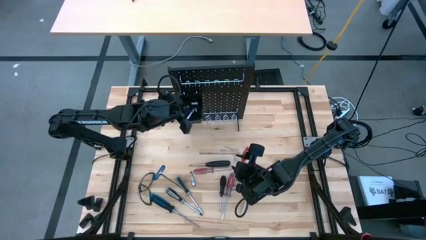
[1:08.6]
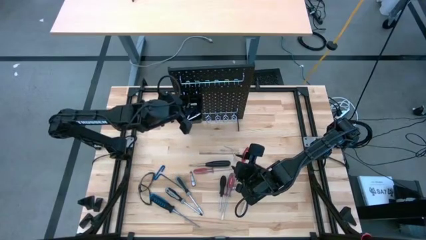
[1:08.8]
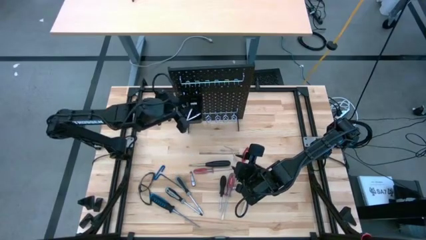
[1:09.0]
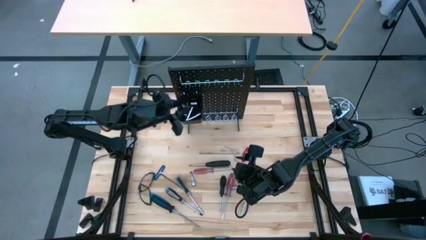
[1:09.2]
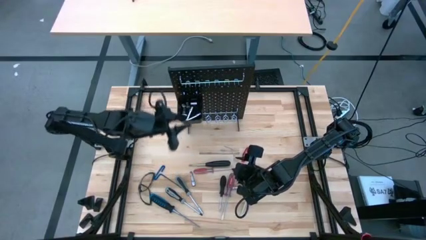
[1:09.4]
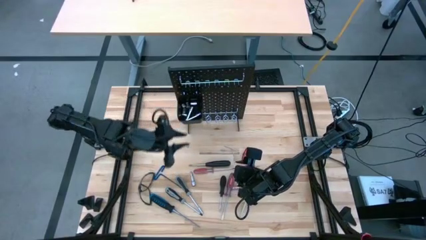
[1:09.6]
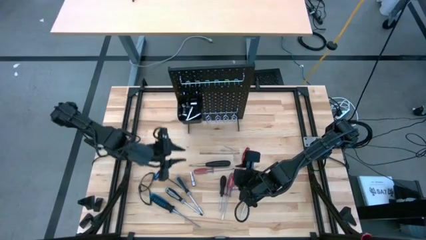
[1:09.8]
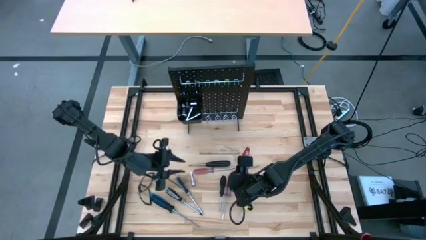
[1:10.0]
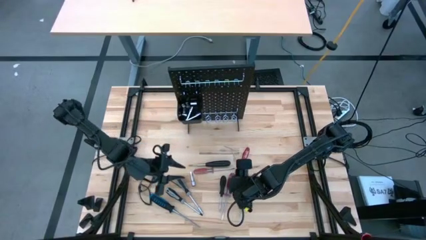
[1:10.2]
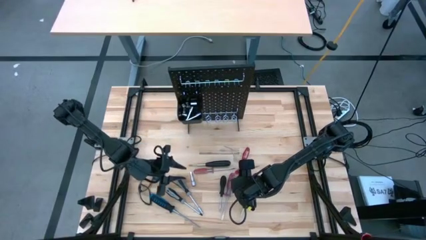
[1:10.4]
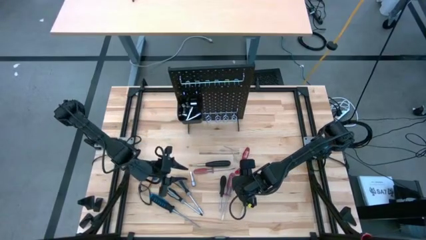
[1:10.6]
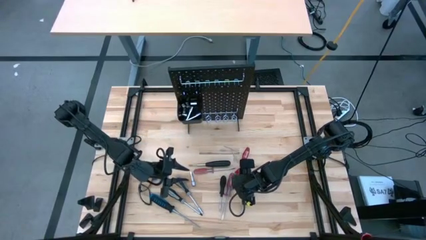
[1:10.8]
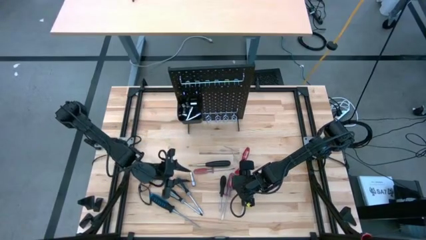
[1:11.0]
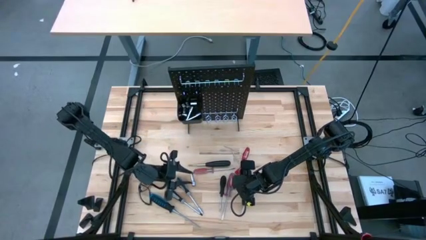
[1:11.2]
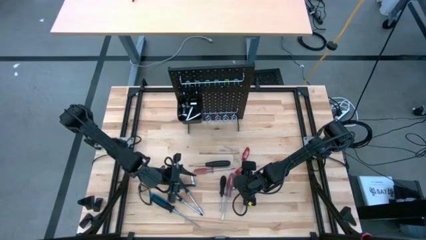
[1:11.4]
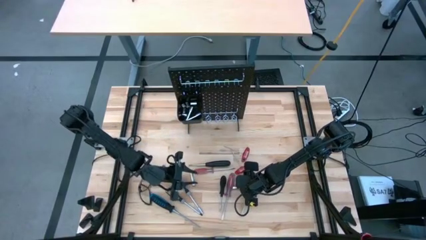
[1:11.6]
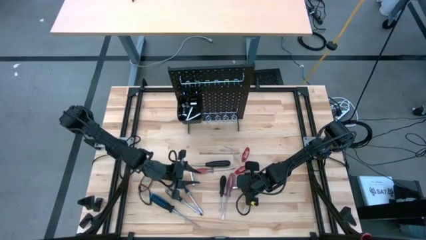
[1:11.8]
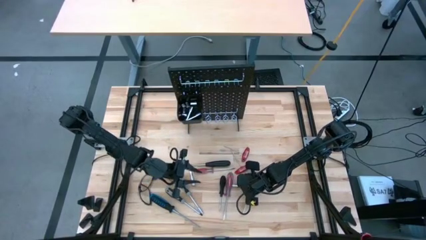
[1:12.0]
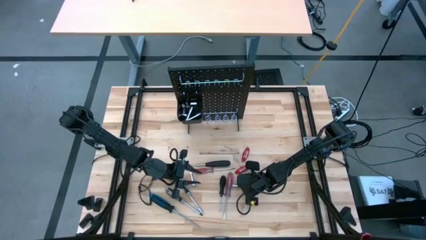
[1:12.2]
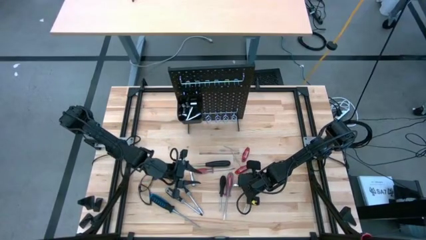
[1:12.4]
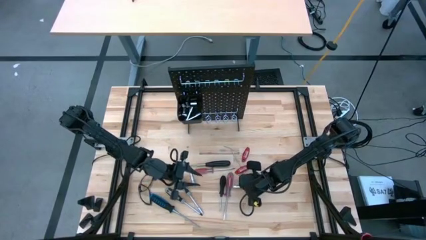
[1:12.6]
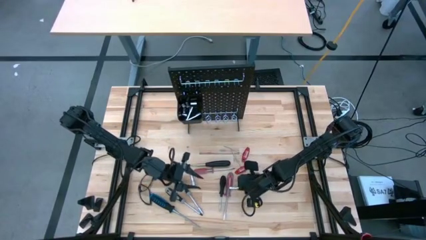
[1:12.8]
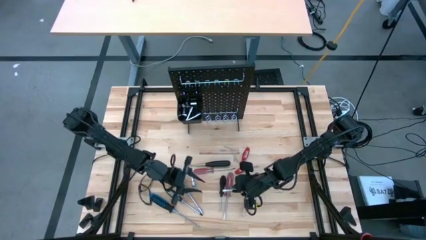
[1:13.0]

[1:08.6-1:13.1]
Task: Hang tools onto peg board
Put the extension bar into the black bin on the pegboard

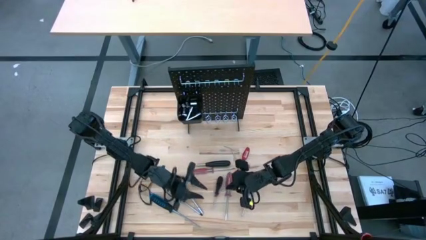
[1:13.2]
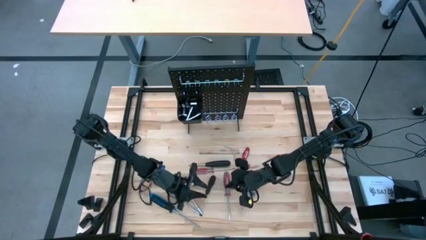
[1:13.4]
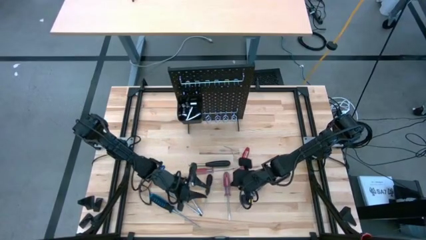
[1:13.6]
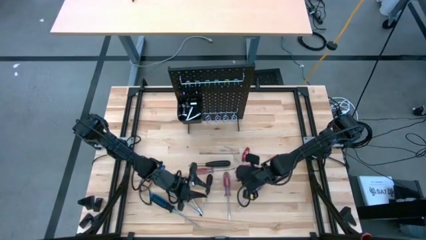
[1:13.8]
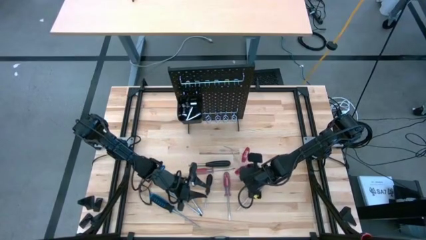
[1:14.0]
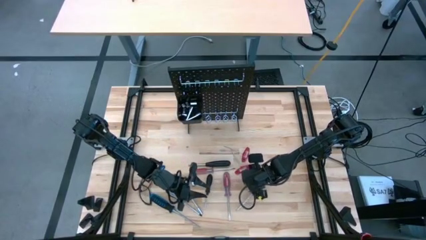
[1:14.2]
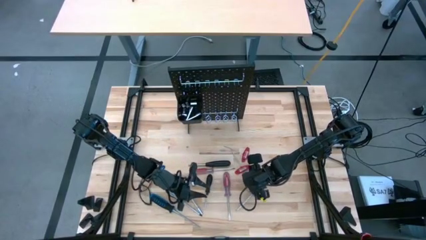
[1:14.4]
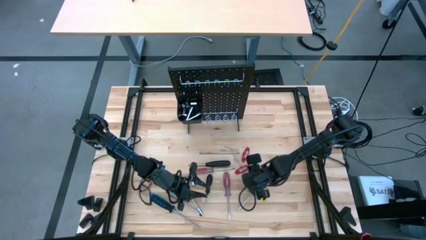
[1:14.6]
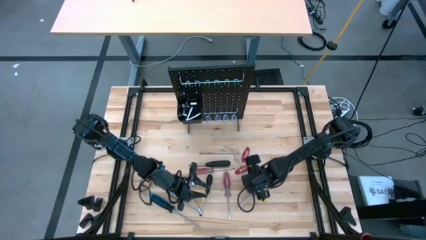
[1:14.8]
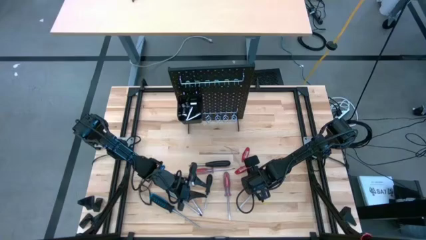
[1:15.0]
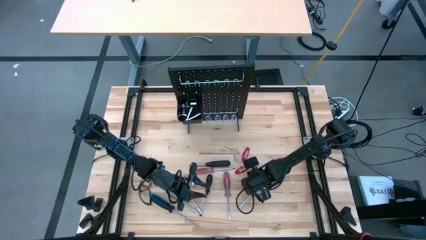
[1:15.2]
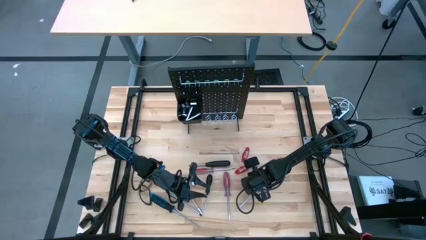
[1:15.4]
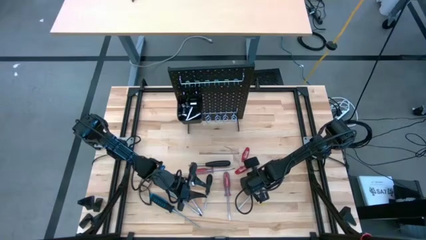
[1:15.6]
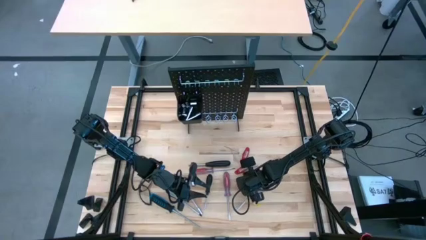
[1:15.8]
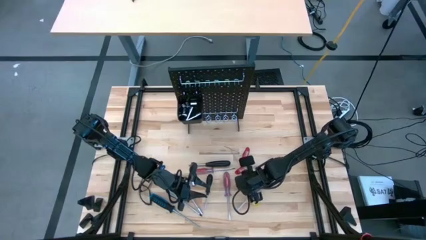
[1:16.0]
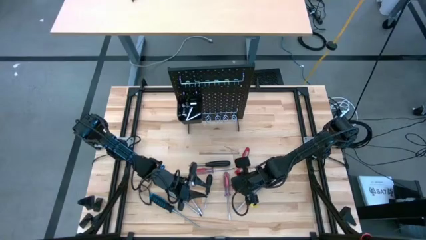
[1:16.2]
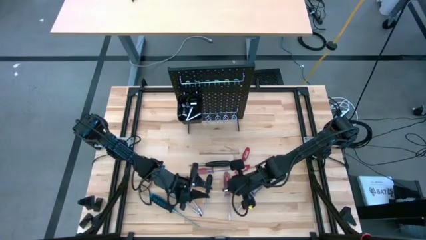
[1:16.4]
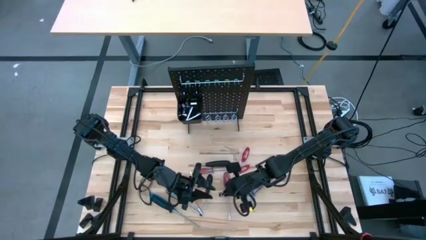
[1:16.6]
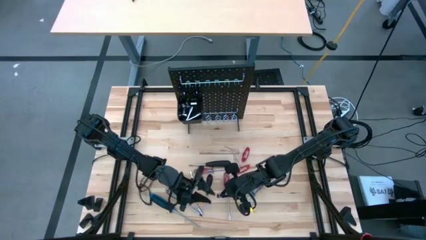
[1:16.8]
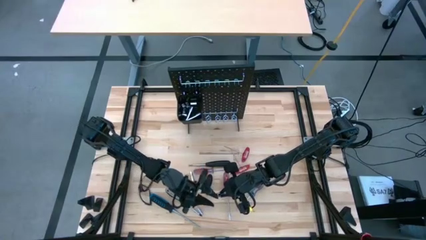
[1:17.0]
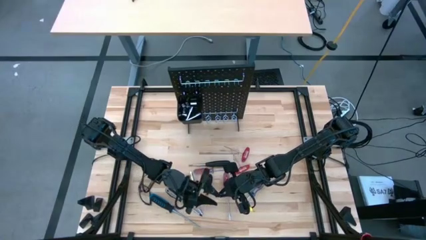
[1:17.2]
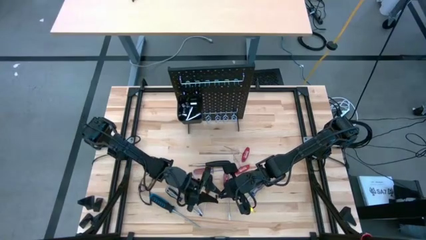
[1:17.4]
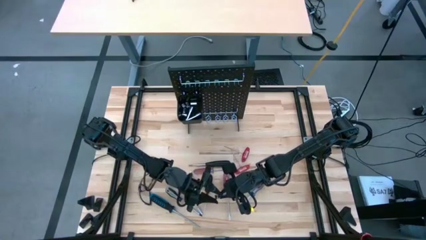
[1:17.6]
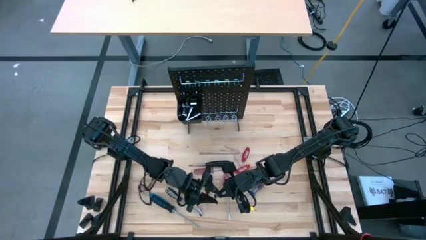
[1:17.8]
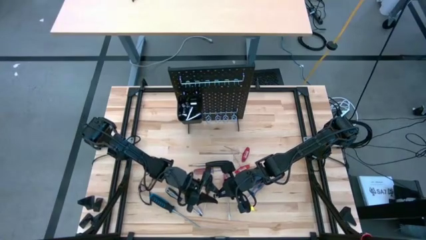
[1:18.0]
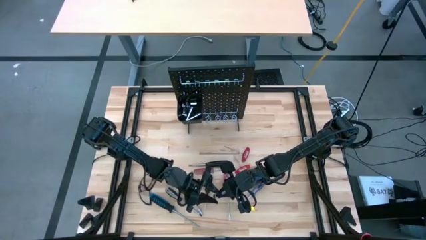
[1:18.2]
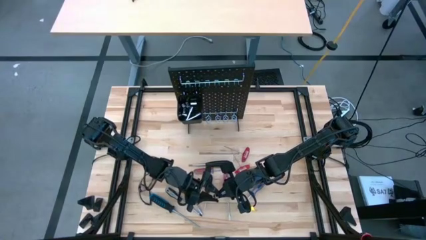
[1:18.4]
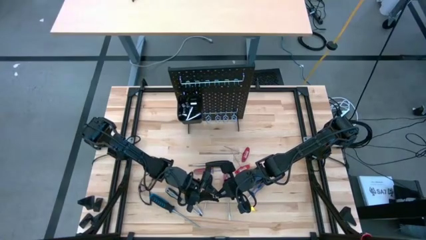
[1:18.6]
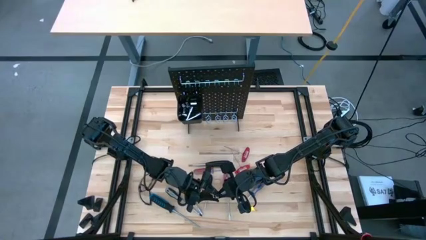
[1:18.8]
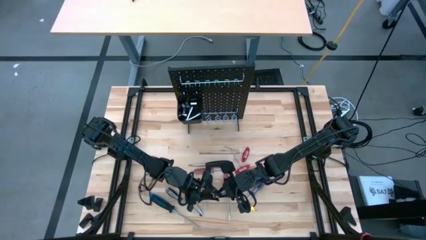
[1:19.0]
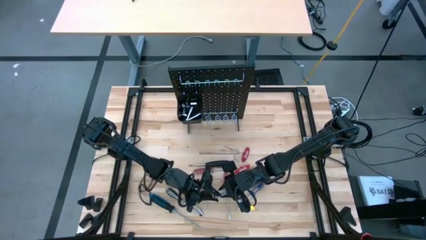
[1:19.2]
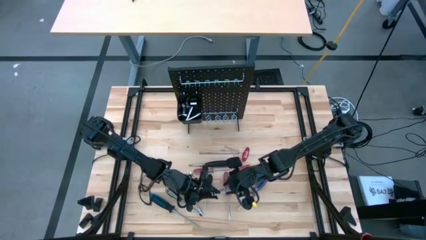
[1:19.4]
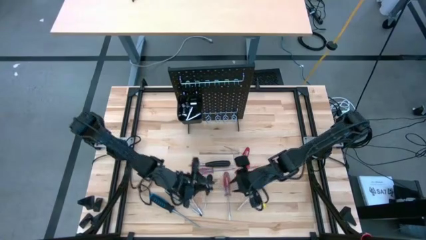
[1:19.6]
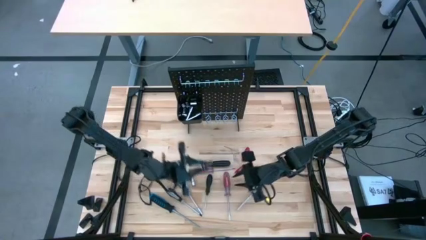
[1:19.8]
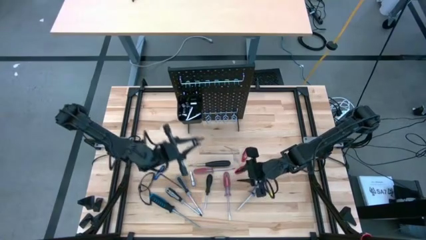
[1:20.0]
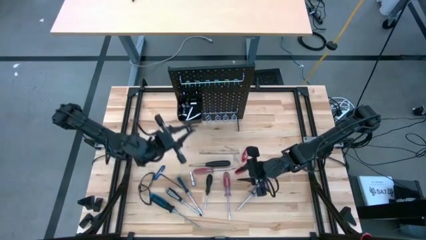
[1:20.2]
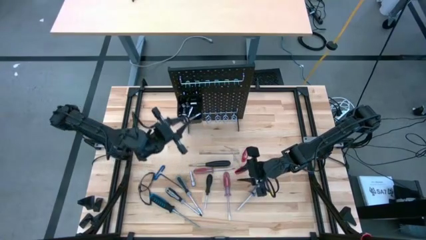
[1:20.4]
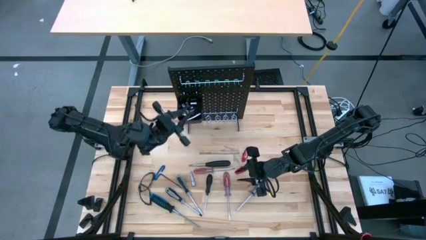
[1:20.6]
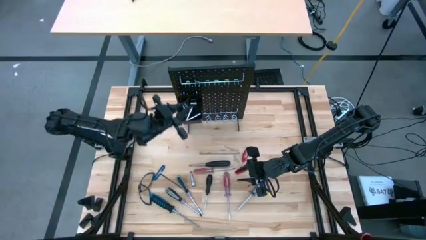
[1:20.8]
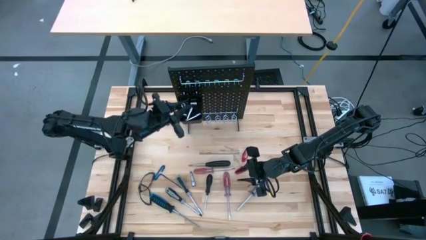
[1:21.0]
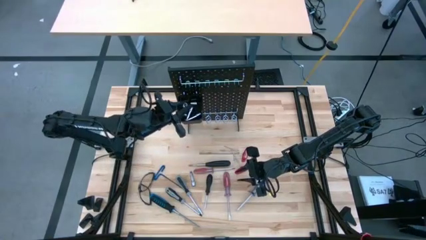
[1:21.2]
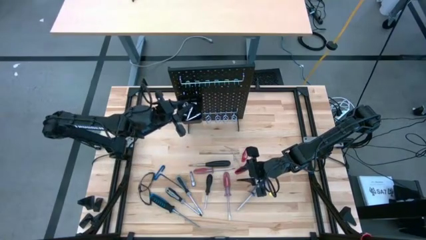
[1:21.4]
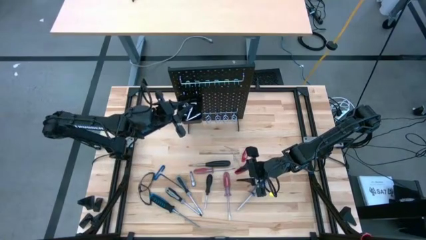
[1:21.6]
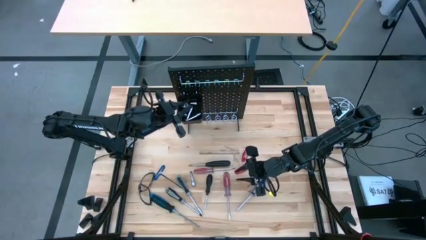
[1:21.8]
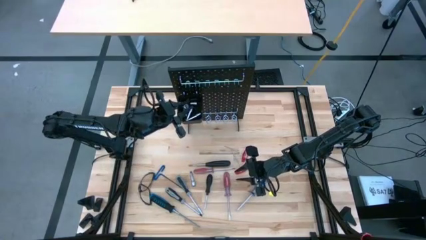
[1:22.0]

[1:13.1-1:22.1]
Put the extension bar into the black bin on the pegboard

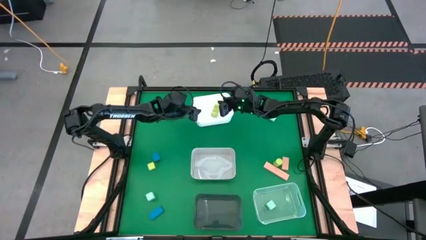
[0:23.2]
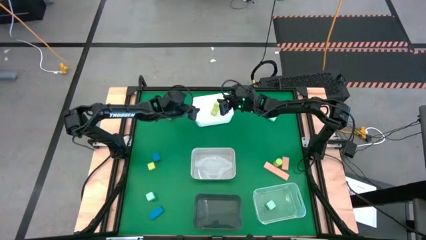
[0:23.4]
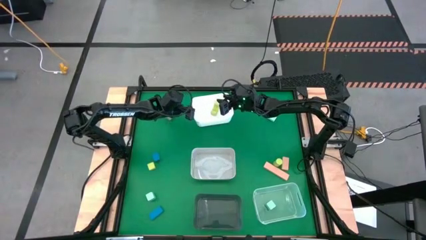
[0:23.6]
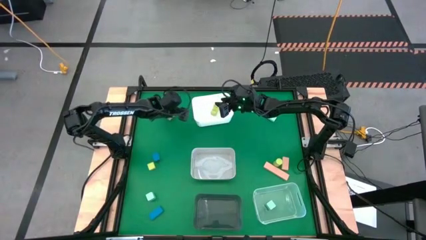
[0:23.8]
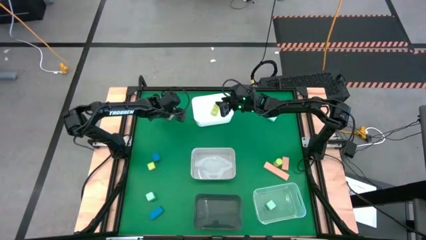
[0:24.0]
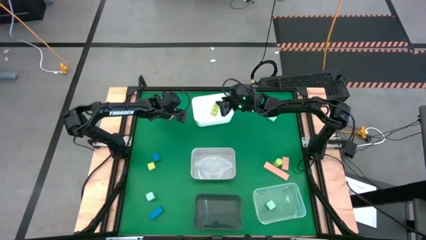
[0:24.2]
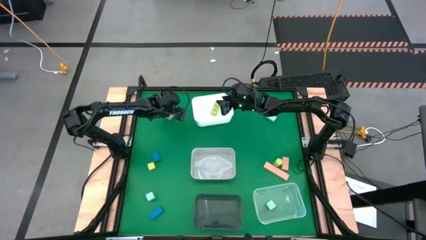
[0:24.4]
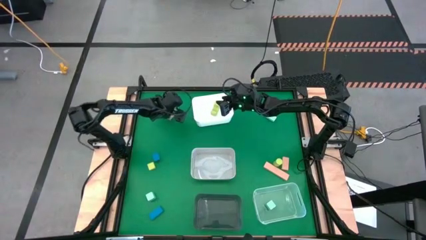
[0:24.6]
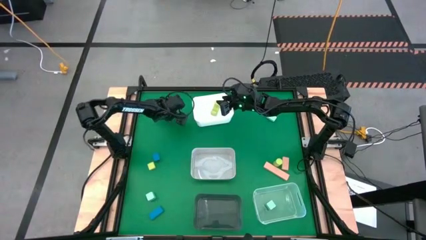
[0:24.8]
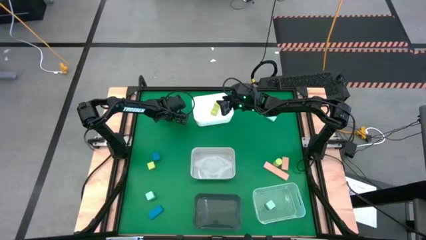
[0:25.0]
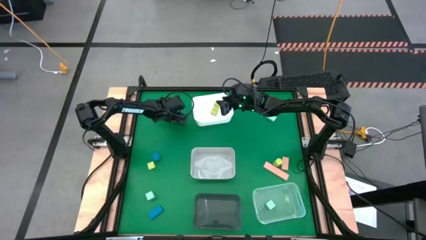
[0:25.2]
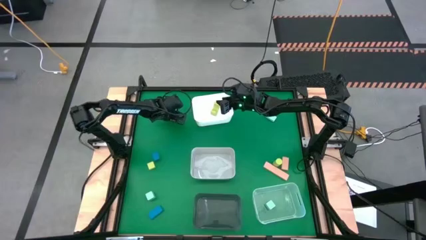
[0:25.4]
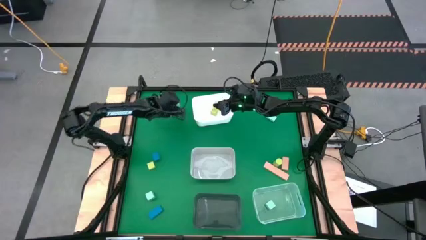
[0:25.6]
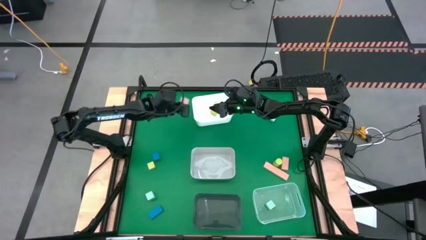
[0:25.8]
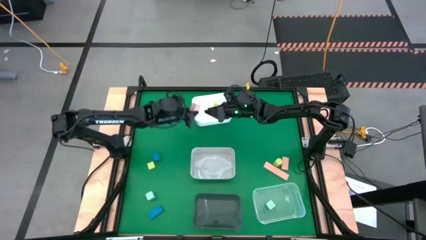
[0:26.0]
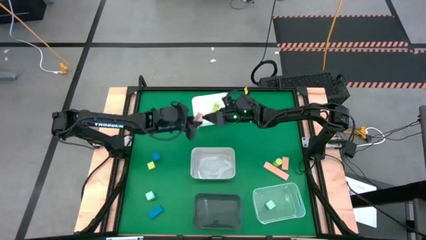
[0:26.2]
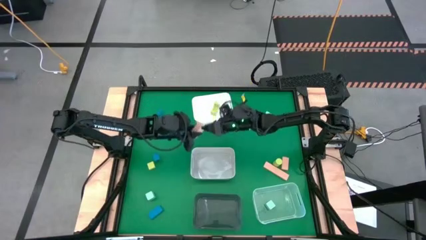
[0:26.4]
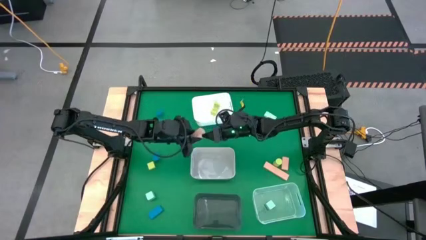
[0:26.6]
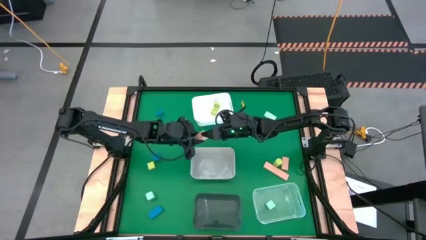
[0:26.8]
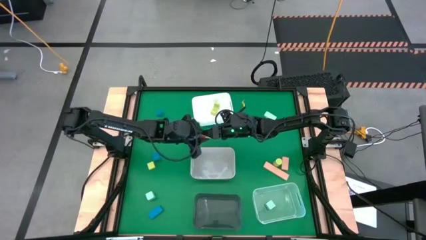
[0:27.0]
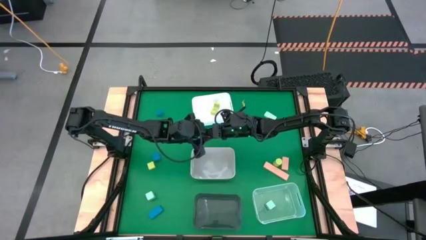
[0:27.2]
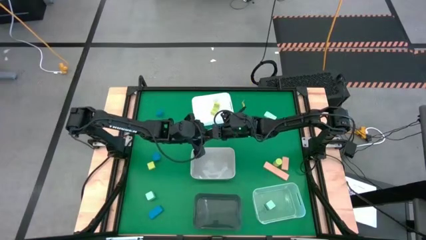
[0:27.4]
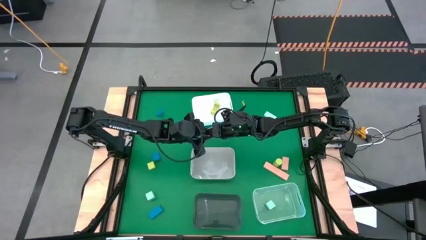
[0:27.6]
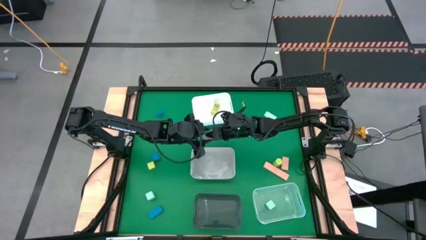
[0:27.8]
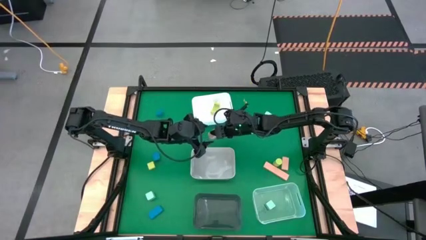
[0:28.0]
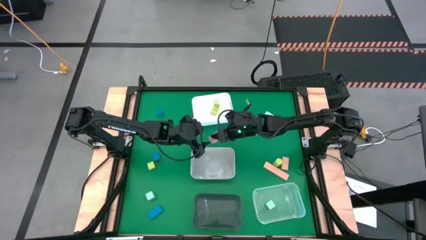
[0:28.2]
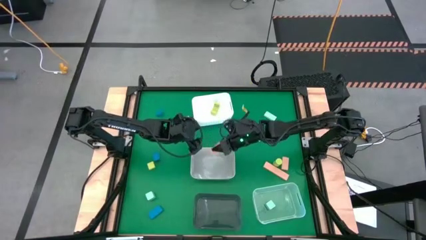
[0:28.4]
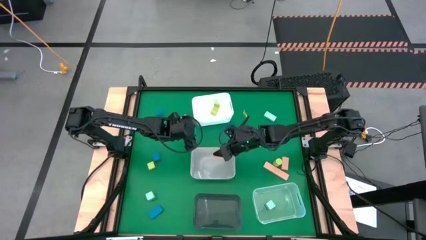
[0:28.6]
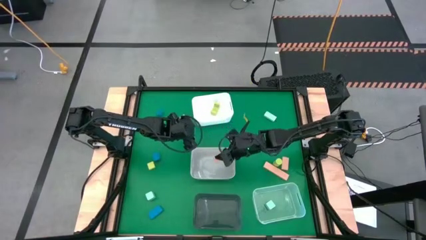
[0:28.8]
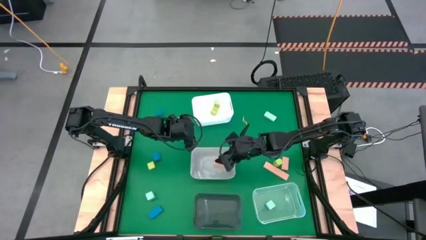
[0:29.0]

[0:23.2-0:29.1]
Task: Sort & place blocks by color
Put the top left light brown block into the gray bin
